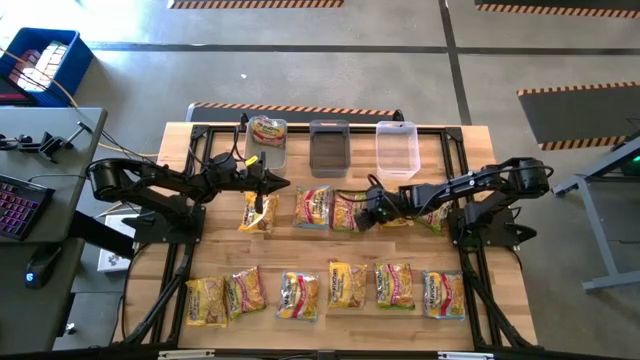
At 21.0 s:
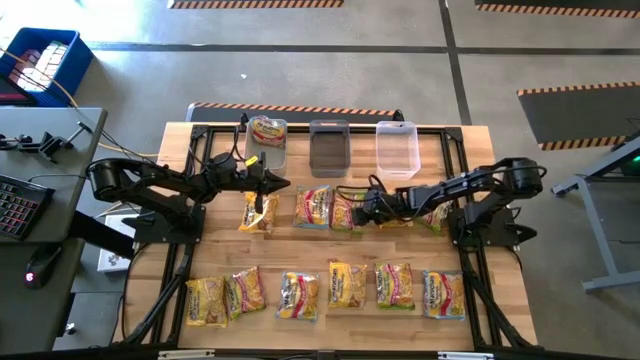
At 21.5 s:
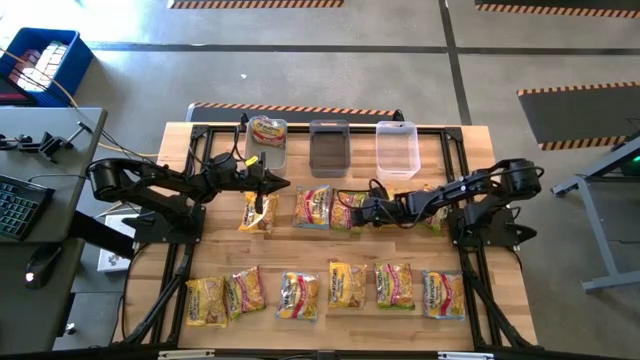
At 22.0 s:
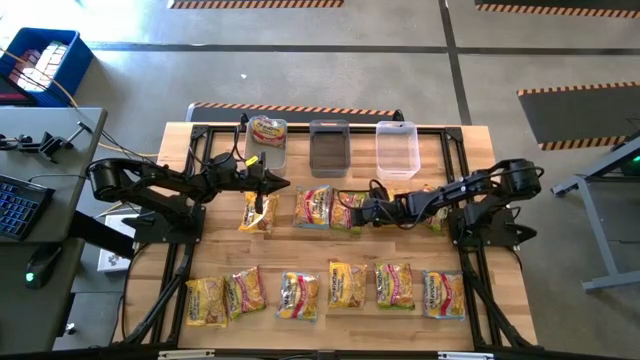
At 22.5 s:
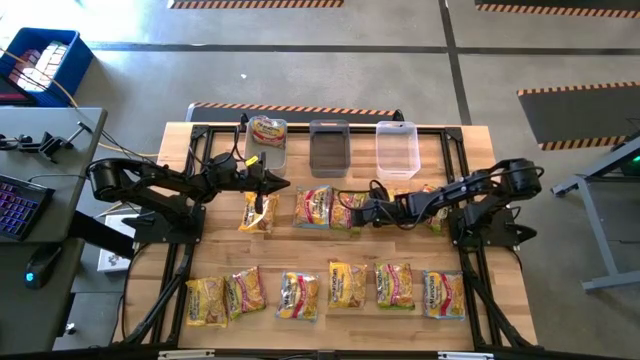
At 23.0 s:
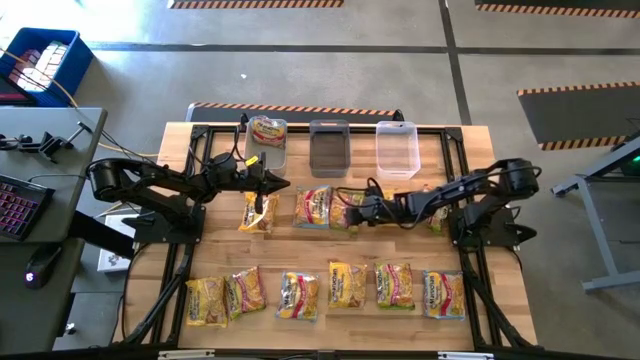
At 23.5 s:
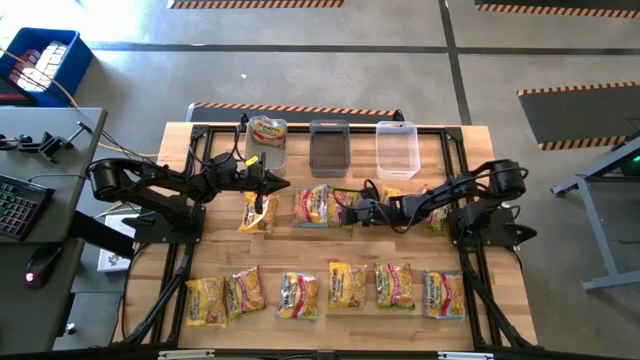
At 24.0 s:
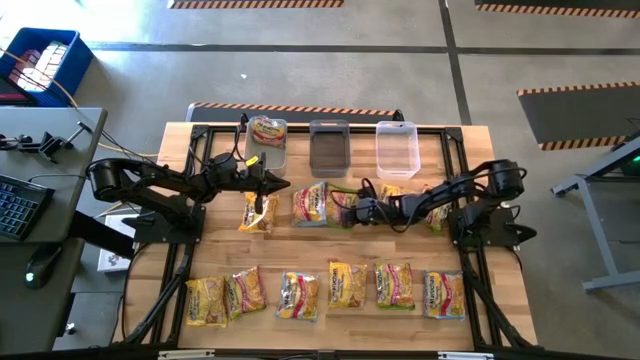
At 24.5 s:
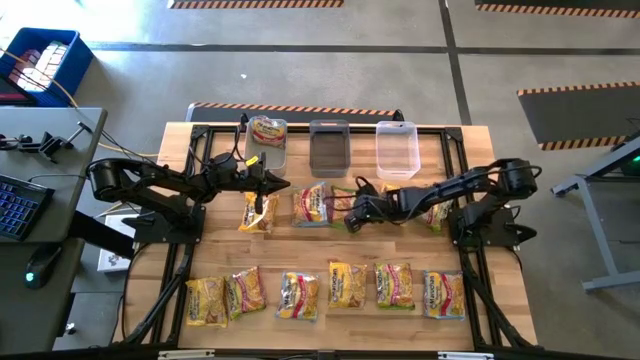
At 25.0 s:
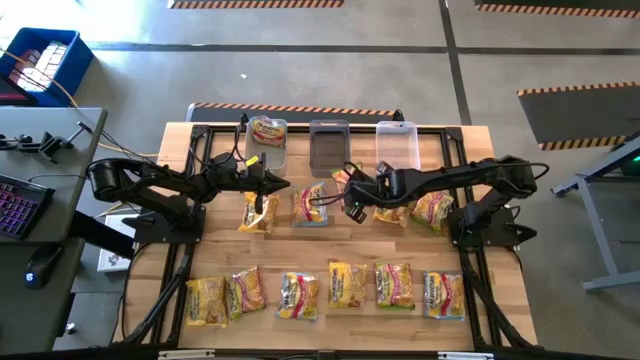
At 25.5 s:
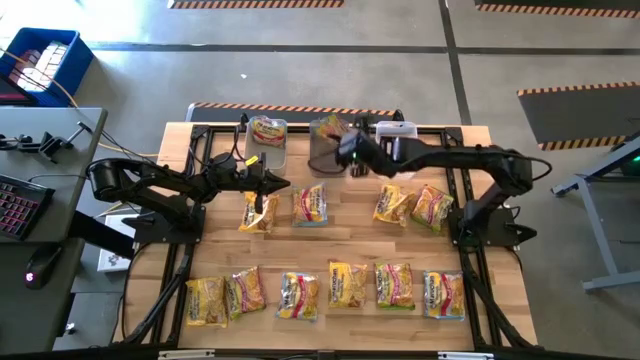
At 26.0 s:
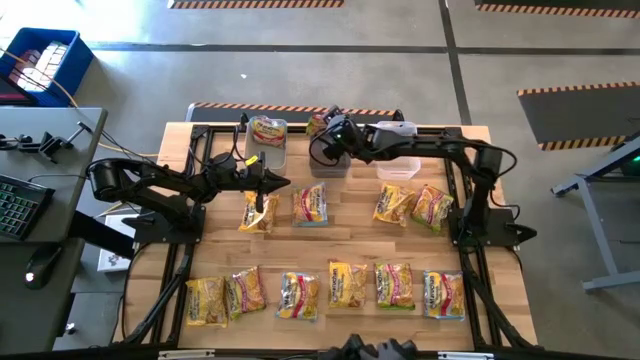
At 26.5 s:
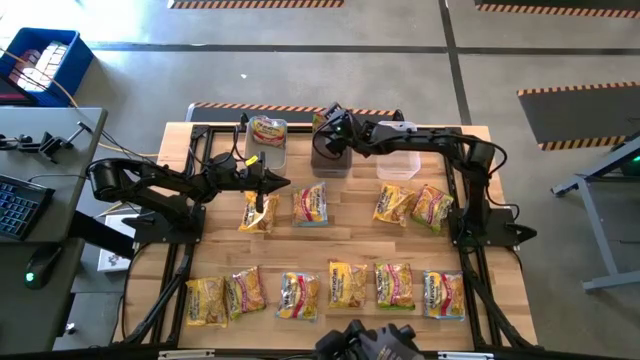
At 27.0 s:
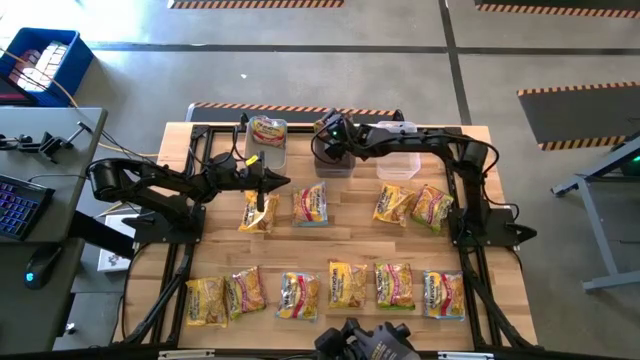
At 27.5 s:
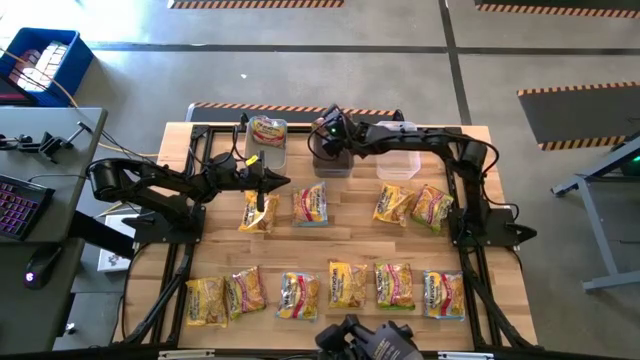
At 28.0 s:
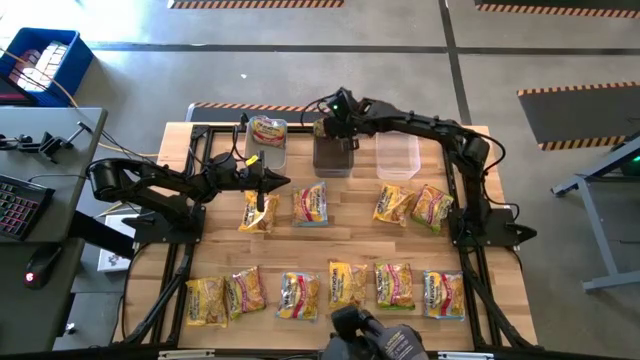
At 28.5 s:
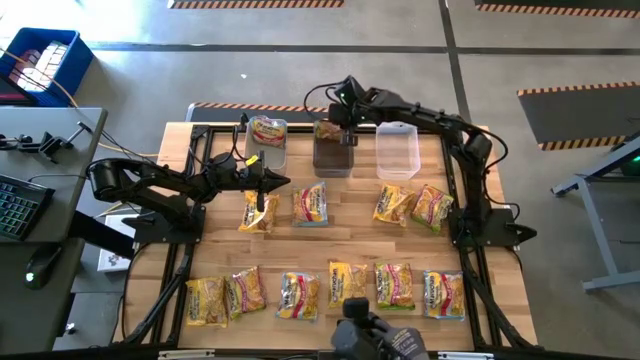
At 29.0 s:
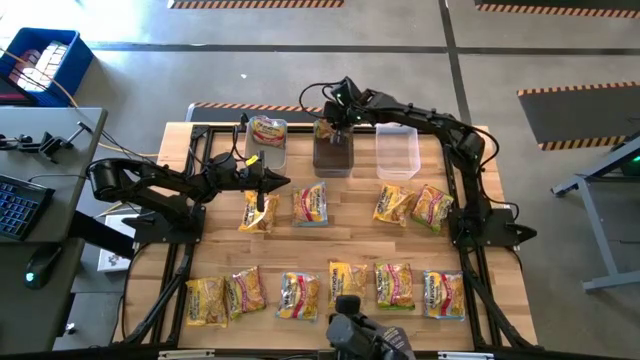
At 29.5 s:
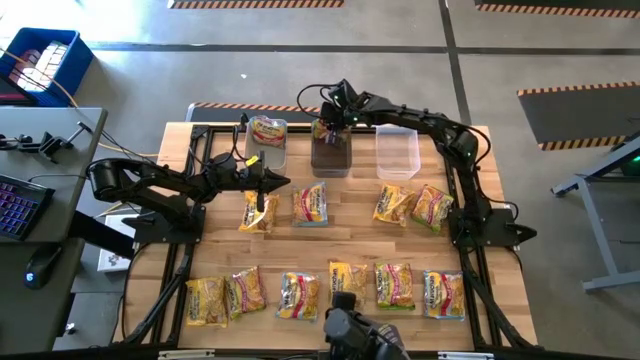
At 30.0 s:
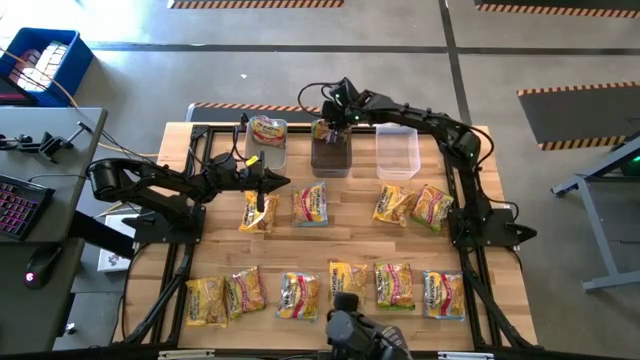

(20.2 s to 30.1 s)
Task: Sort Maruchan noodles
Put the green noodle pack into the black bin

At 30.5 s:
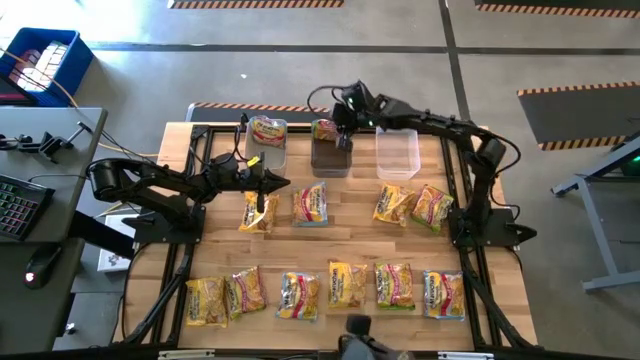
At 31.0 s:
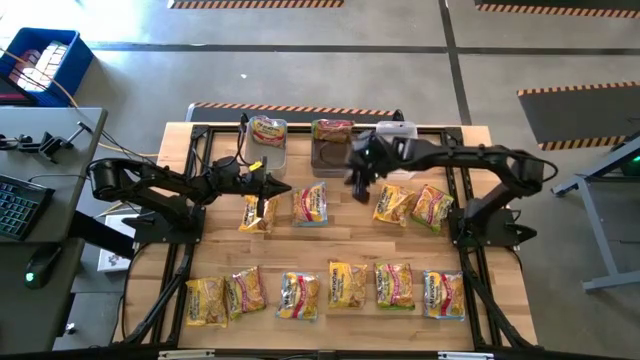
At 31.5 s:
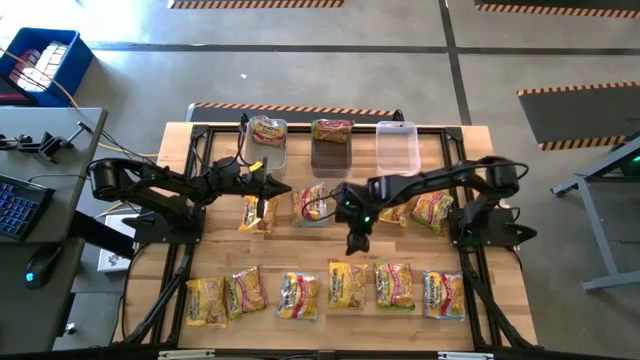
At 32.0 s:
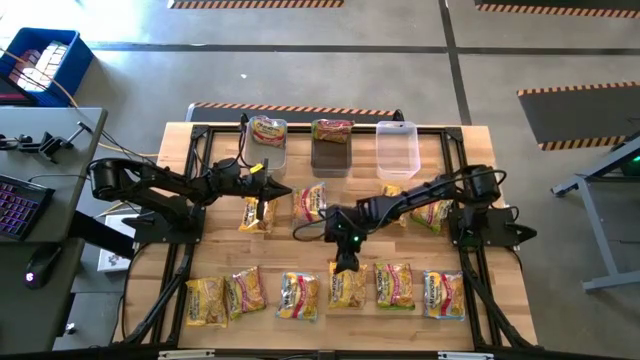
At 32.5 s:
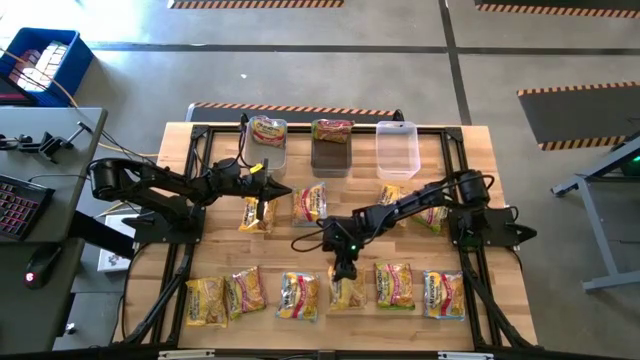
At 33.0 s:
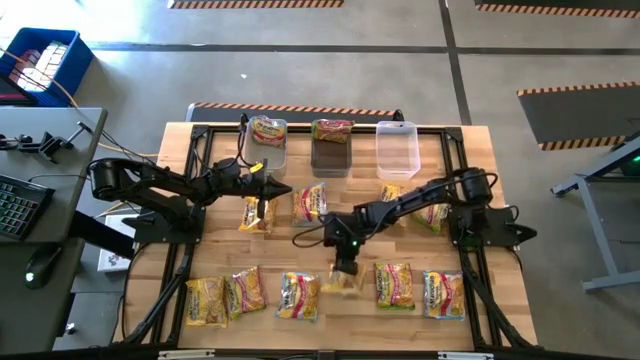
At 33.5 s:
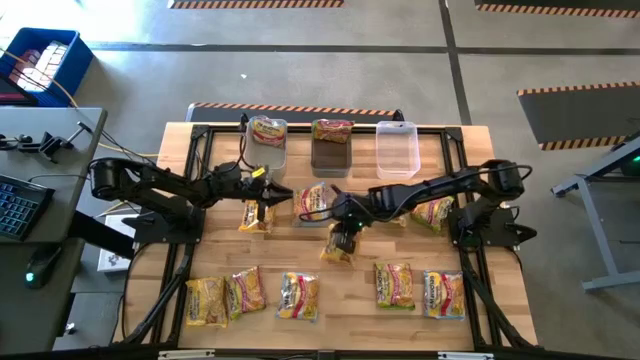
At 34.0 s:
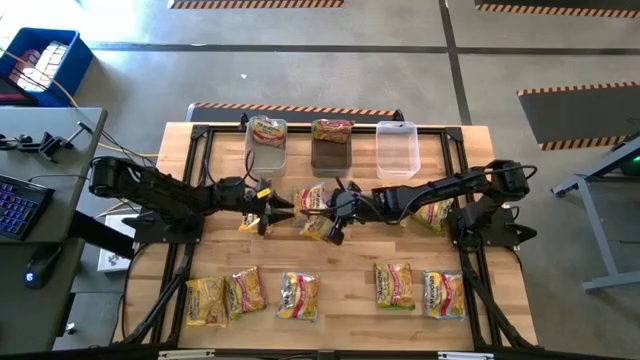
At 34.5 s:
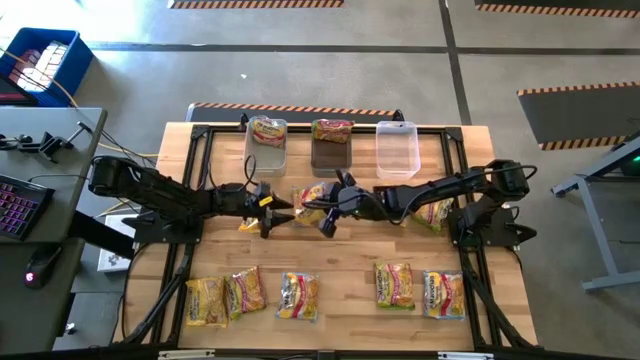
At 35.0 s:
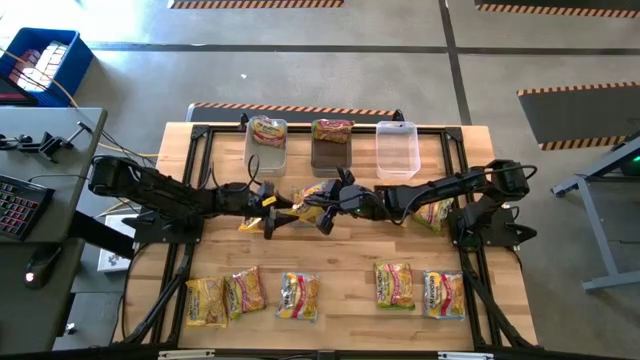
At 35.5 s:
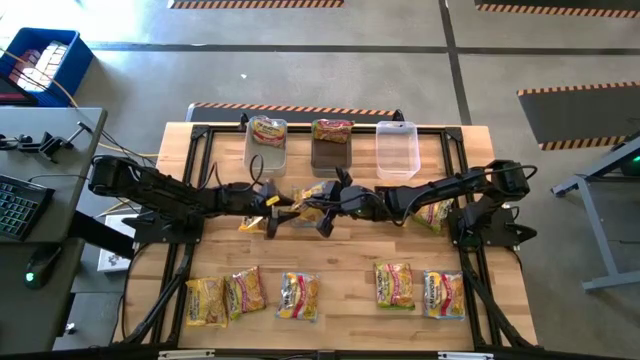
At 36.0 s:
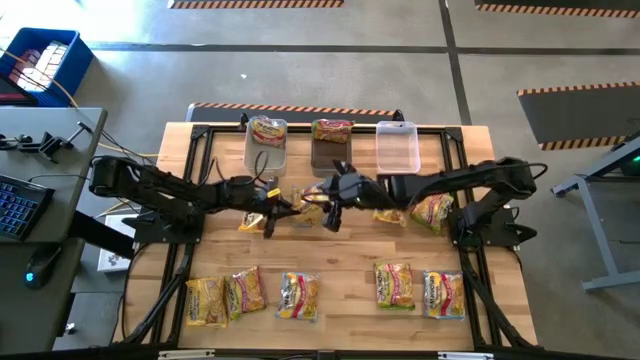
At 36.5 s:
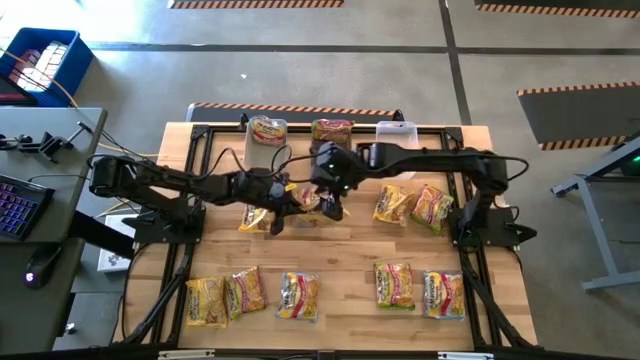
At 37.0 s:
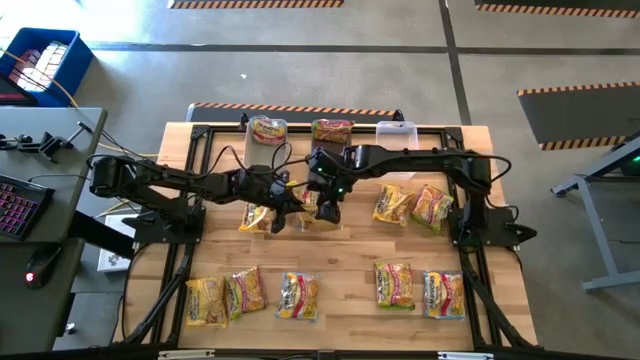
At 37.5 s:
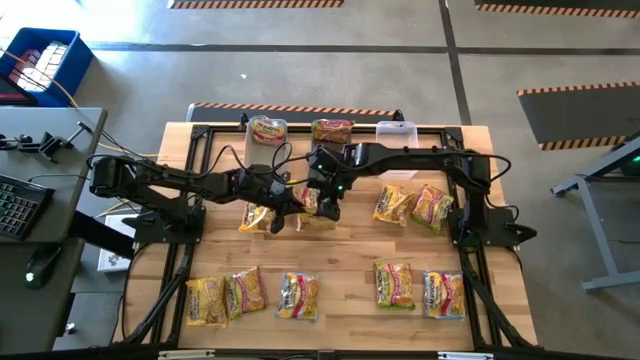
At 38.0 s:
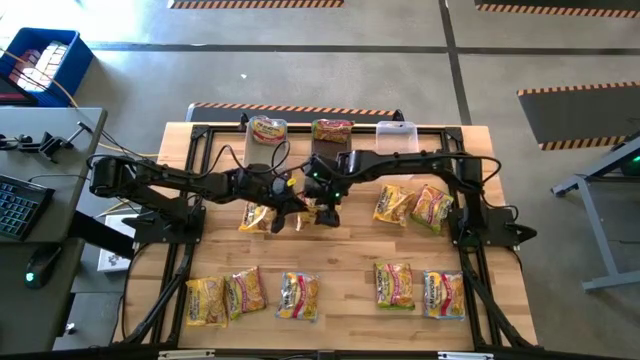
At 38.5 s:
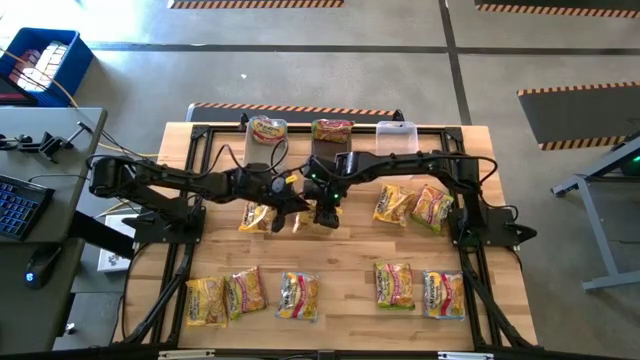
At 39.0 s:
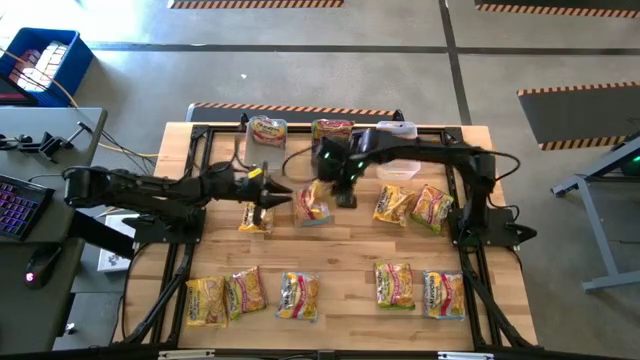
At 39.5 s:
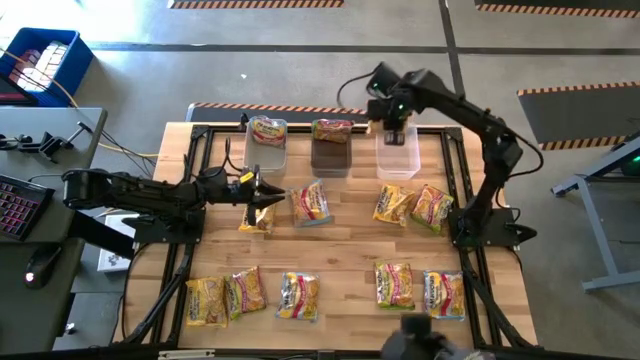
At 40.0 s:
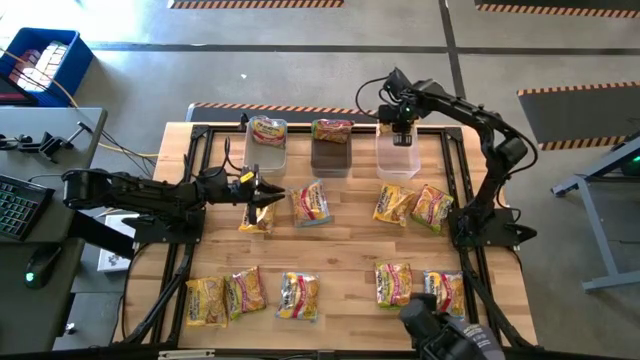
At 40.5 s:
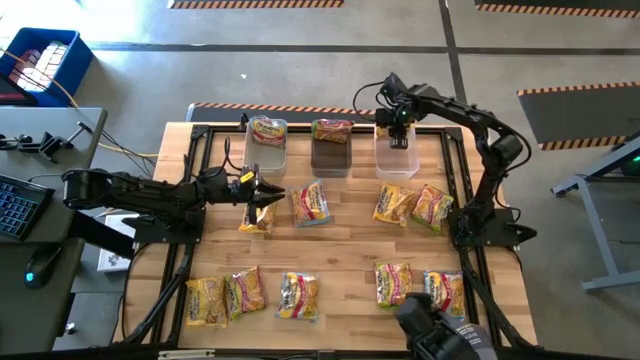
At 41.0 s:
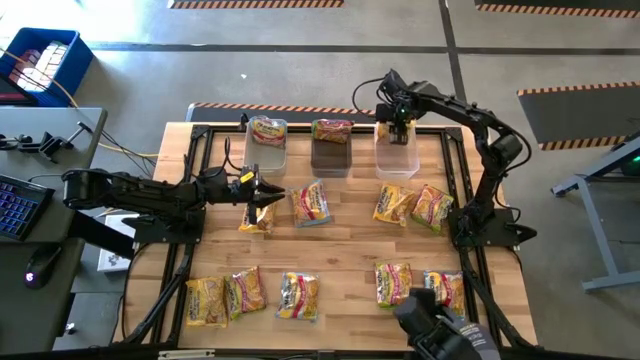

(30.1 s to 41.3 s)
Put the yellow noodle pack into the transparent bin
